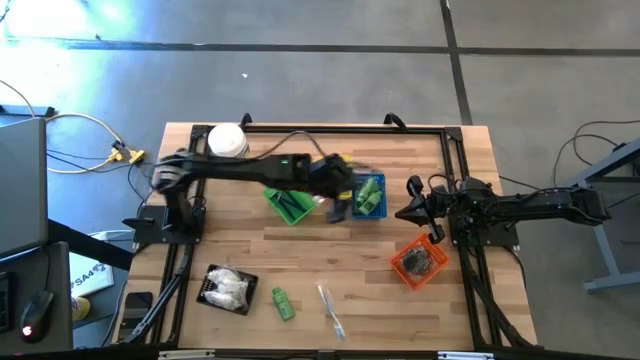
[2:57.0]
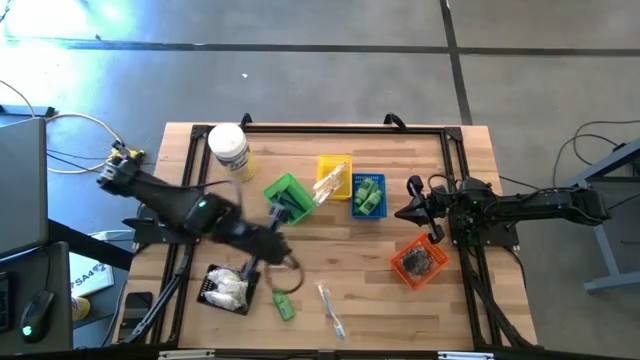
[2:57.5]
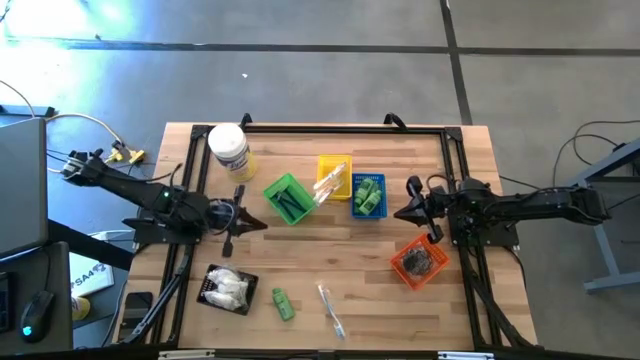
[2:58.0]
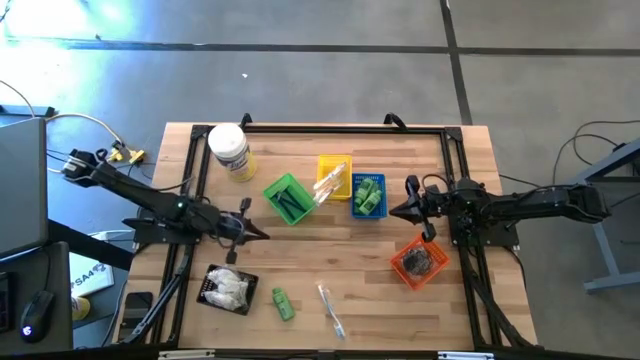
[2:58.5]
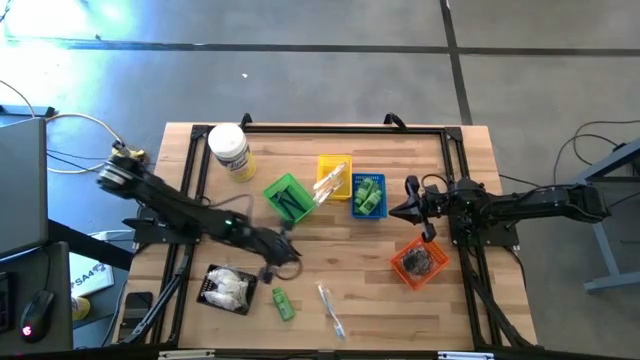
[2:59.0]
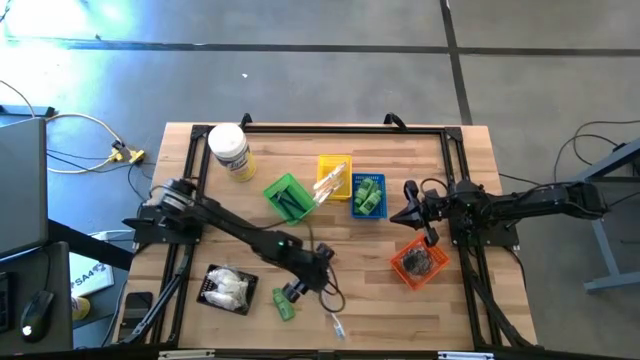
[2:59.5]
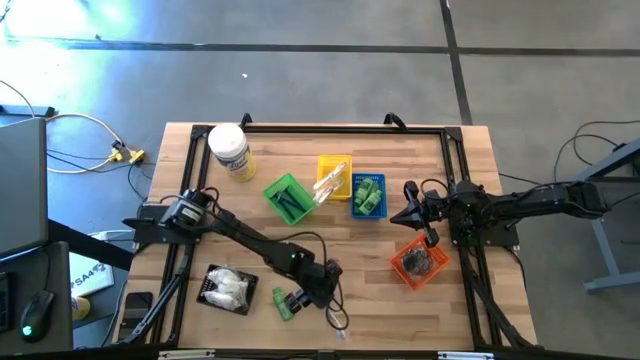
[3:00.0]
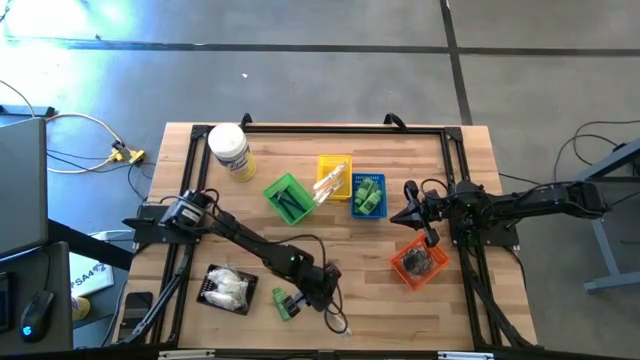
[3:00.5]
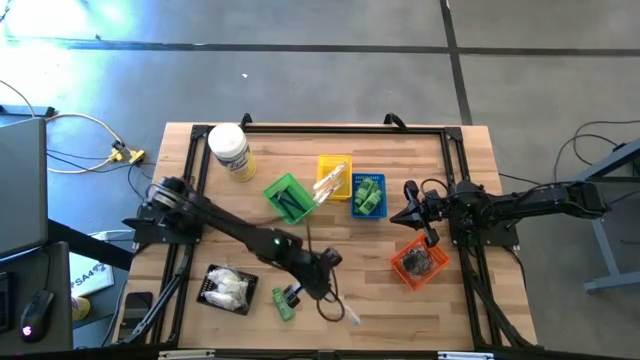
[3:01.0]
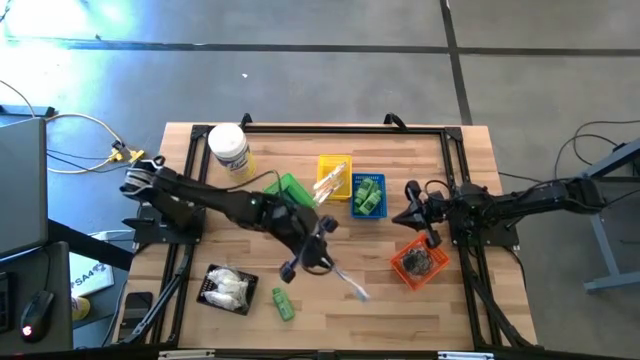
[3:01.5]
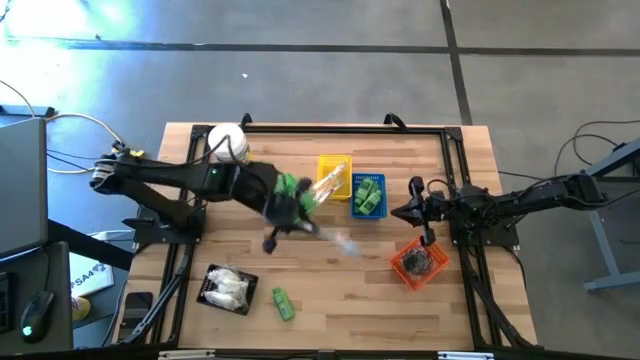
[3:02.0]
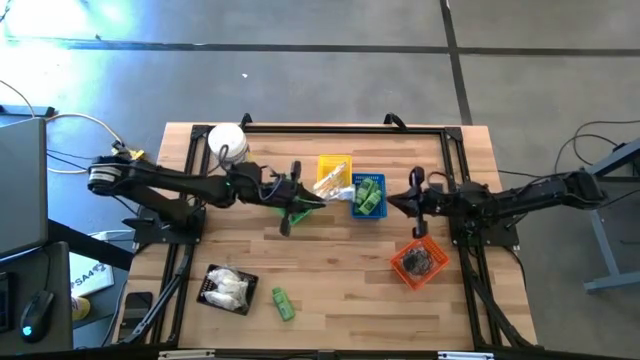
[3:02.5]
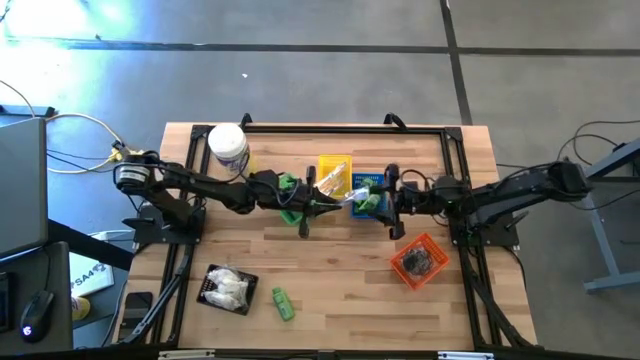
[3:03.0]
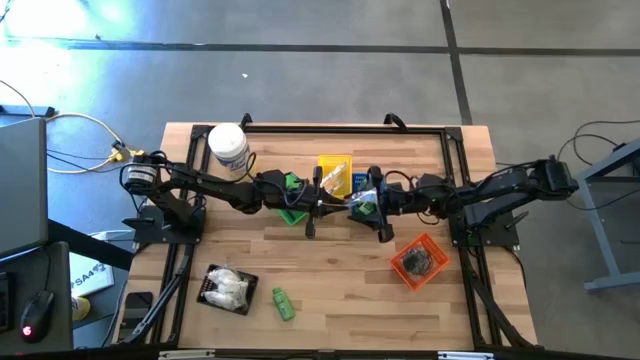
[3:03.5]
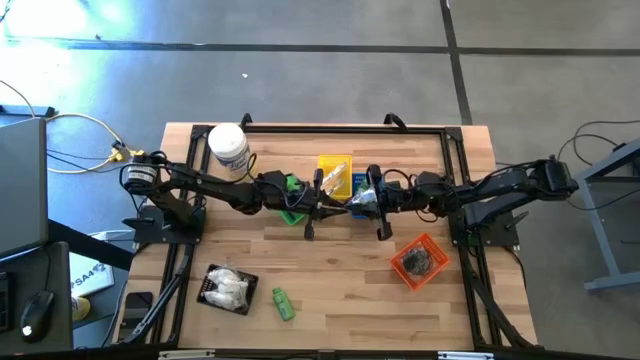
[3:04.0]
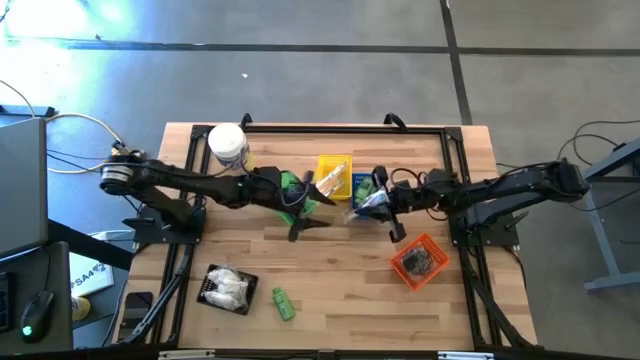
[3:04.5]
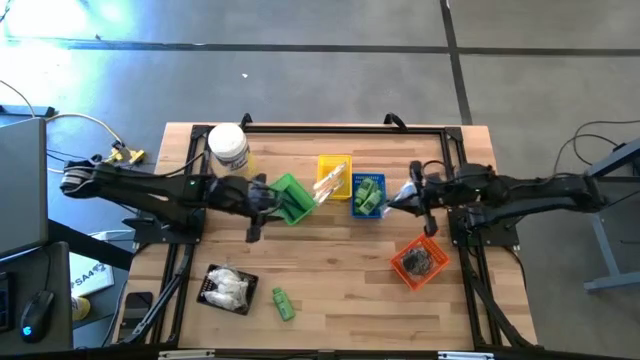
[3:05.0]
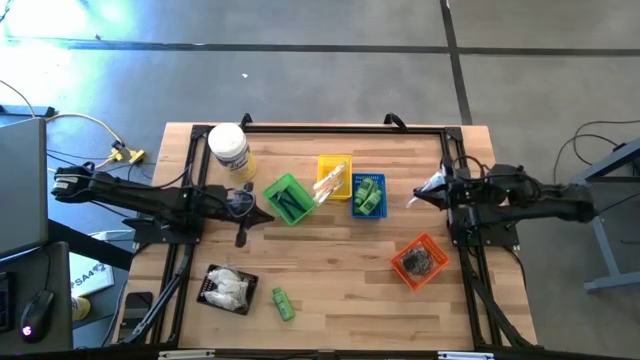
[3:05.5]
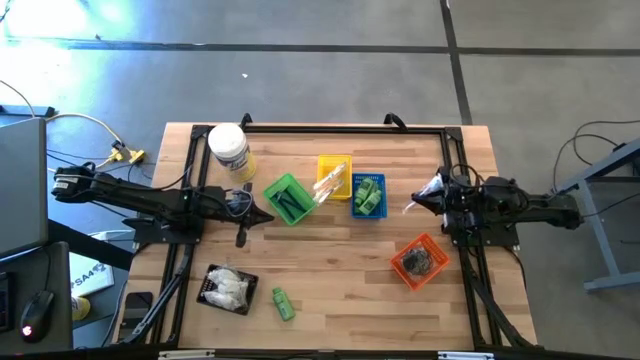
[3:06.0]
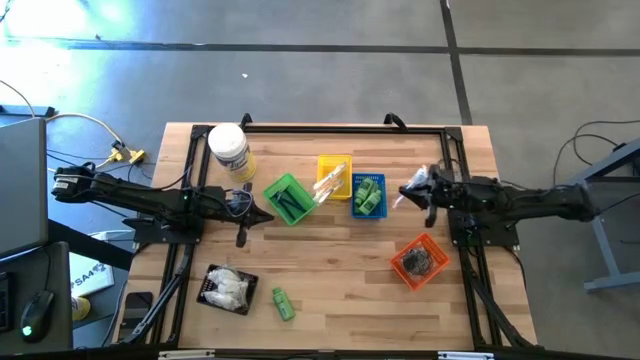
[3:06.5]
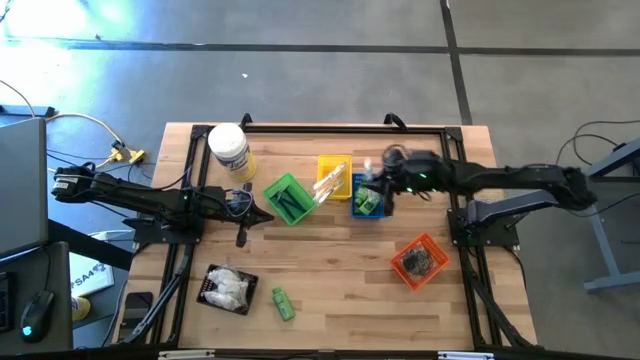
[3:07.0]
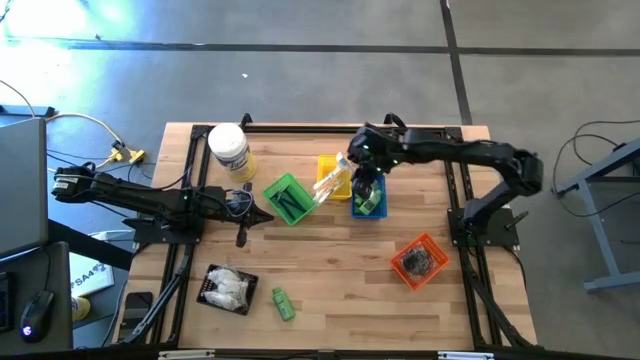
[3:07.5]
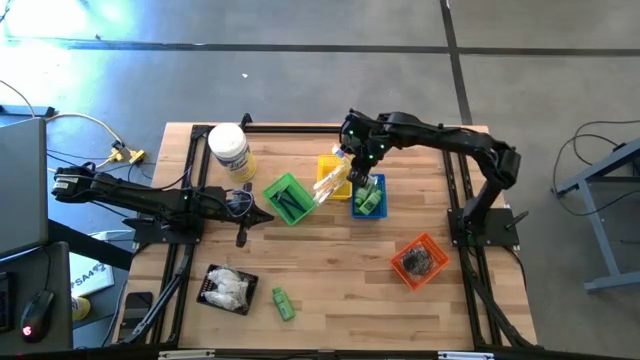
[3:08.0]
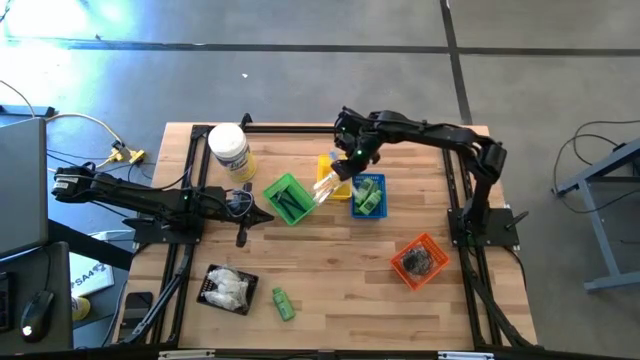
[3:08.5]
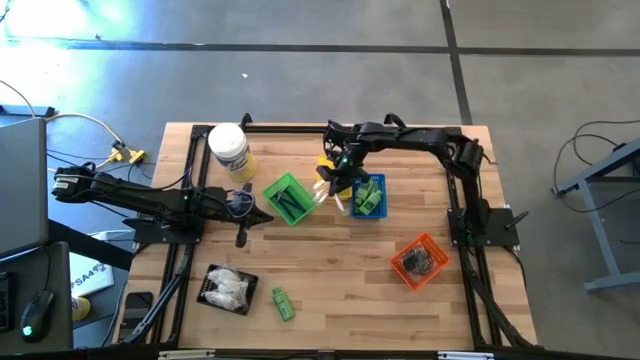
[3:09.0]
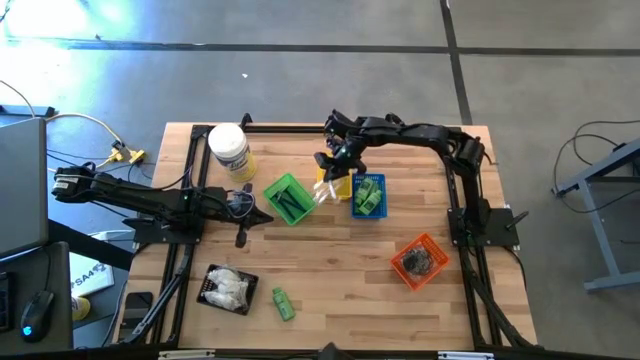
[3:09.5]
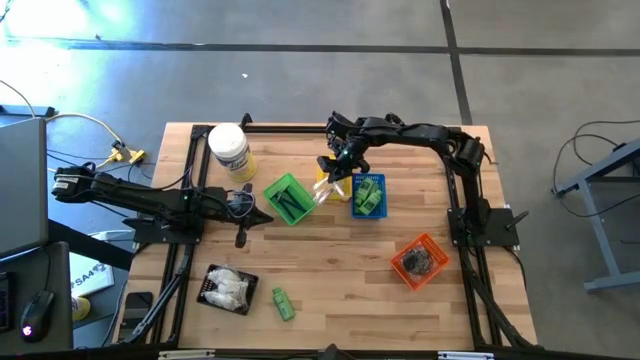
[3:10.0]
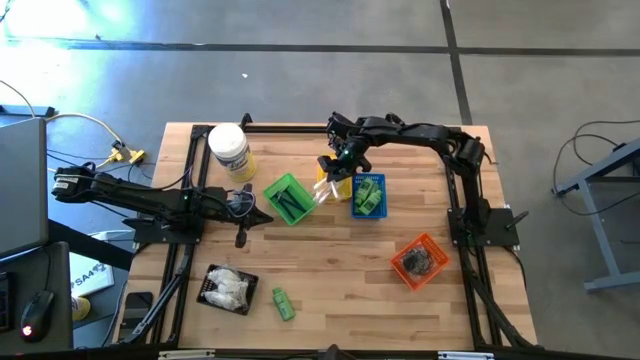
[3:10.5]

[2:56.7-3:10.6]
Task: Pick & Place Travel size toiletries
Put the blue toothbrush into the yellow basket

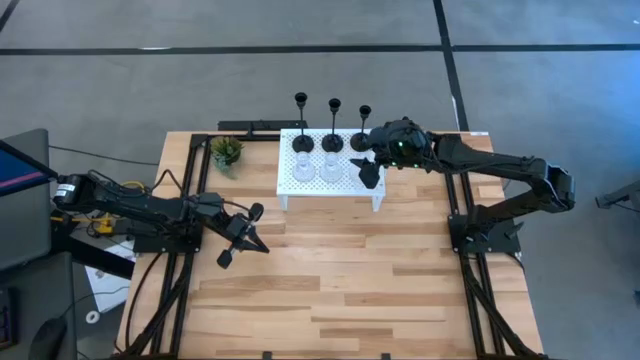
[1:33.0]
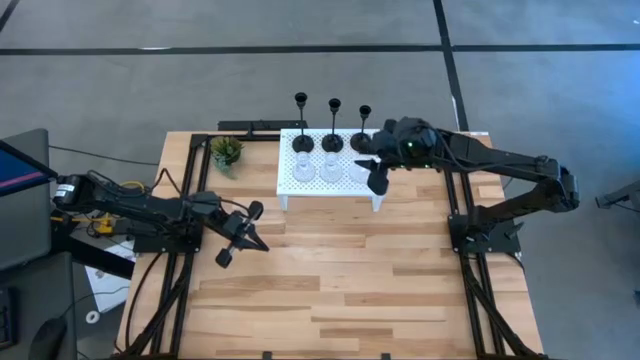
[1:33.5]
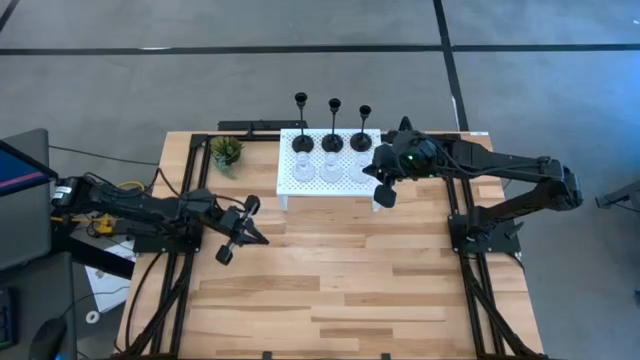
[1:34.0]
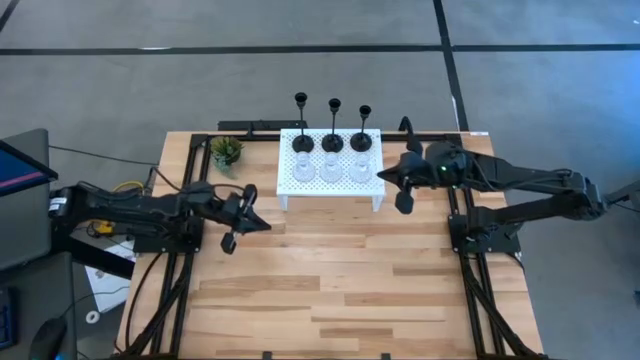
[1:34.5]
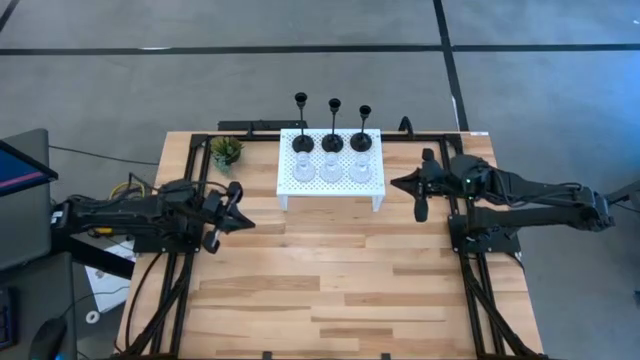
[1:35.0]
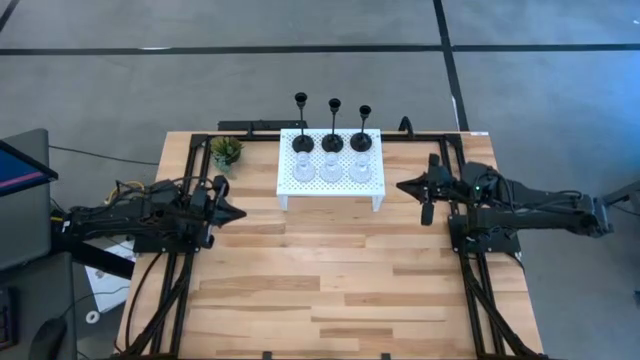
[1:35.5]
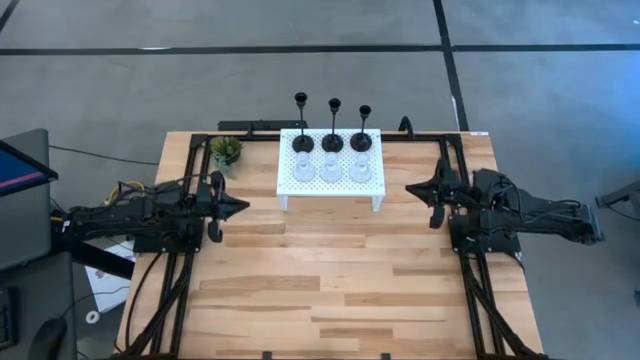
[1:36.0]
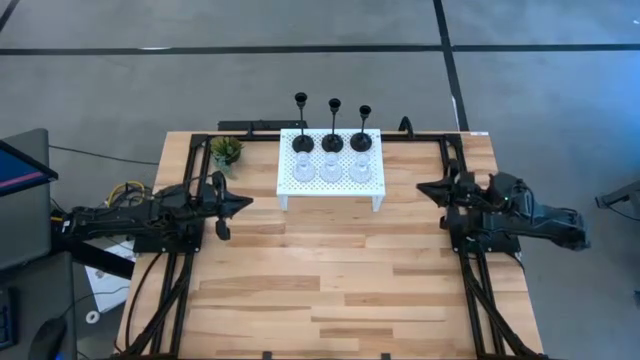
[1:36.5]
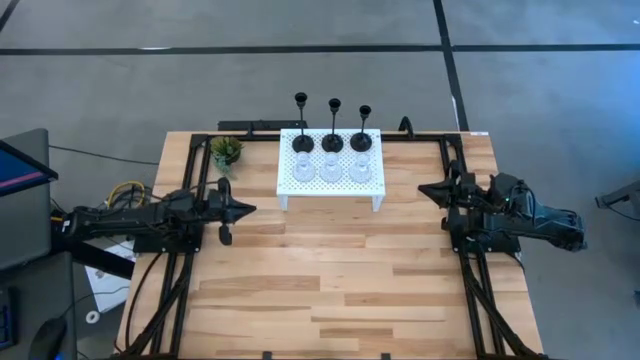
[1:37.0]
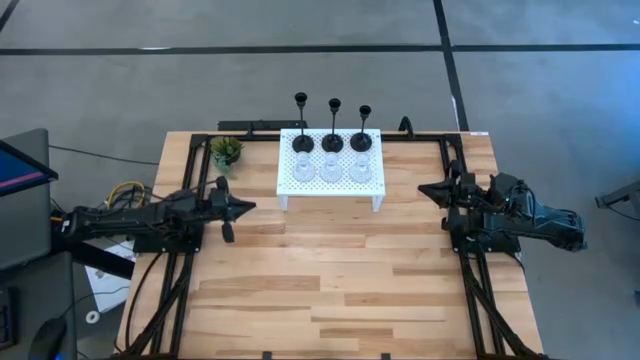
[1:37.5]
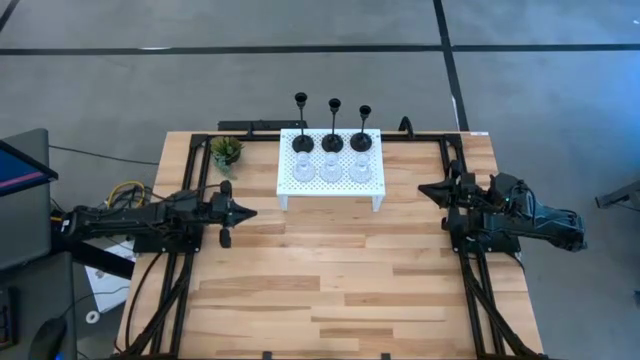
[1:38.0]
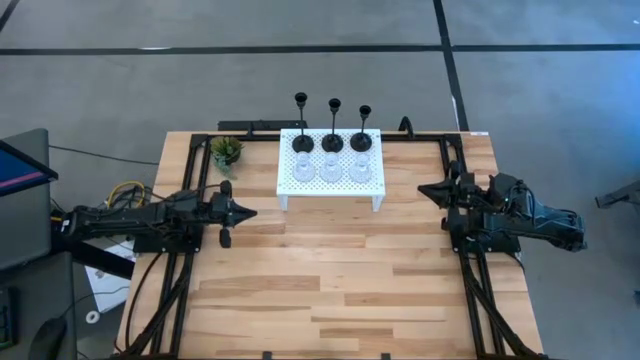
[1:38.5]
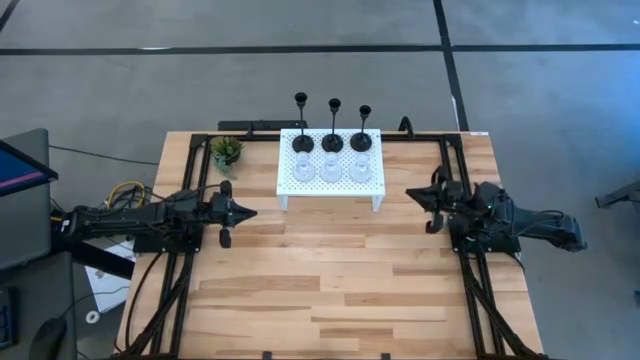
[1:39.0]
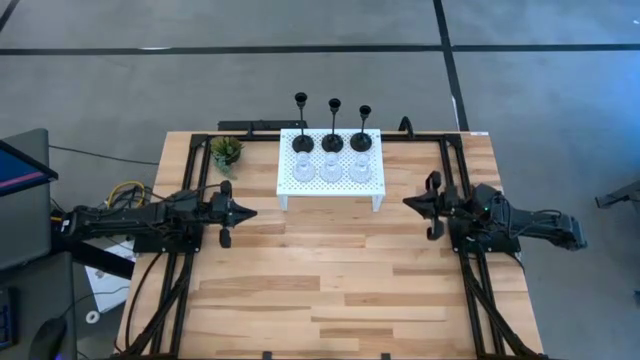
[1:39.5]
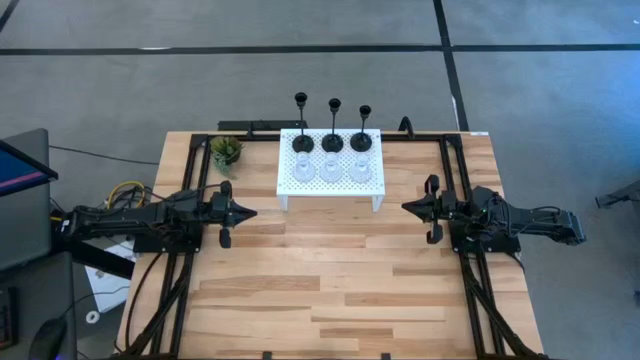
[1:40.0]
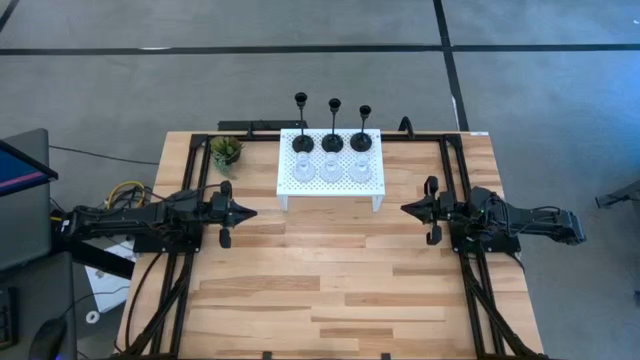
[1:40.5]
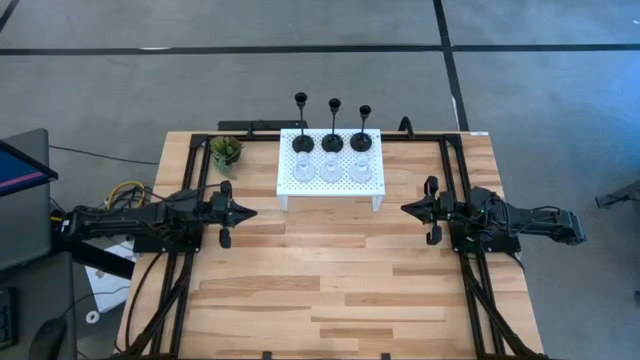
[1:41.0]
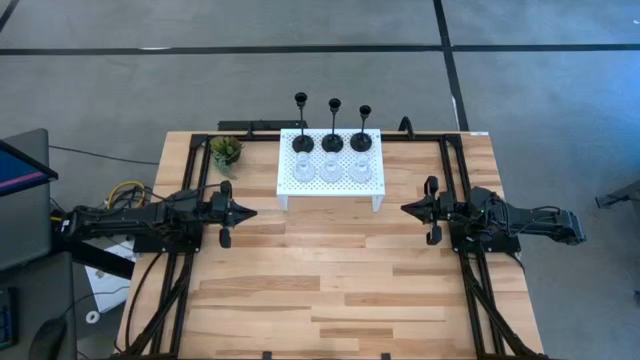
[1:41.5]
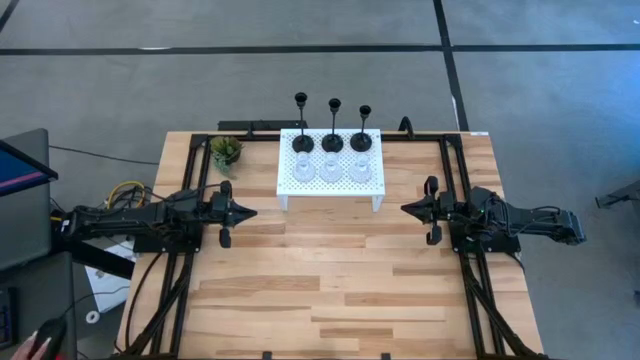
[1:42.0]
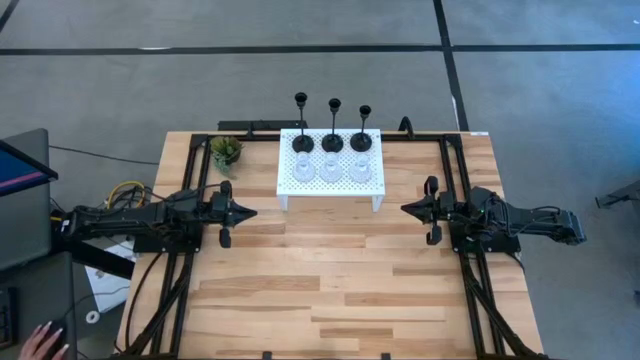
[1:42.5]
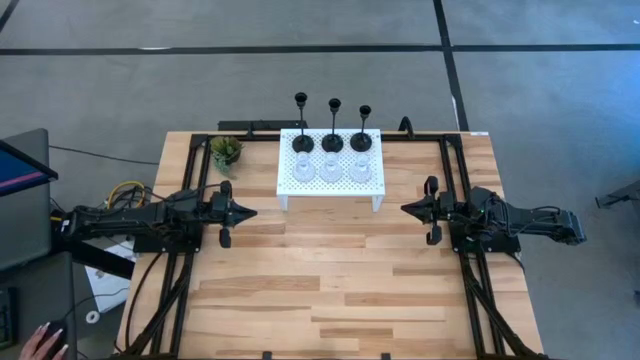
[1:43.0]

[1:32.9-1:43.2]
Task: Pick & Place candle stick holders
Return to Home Position
